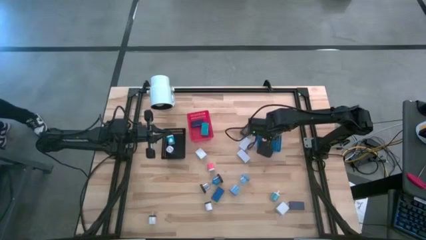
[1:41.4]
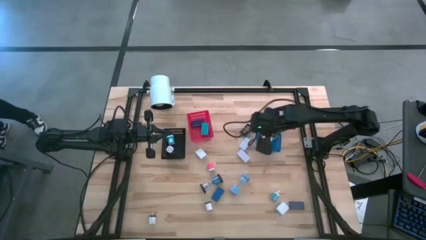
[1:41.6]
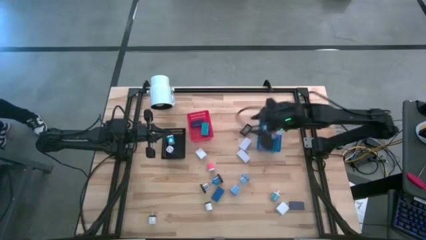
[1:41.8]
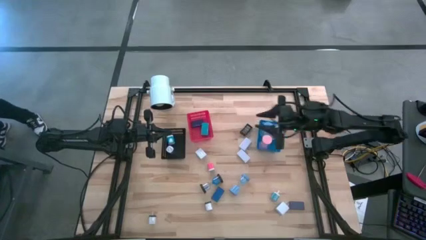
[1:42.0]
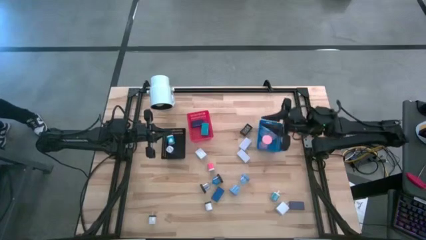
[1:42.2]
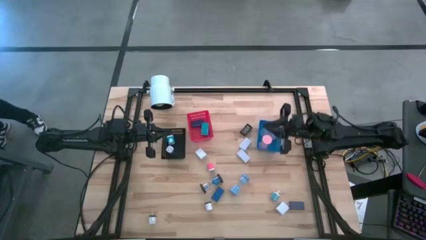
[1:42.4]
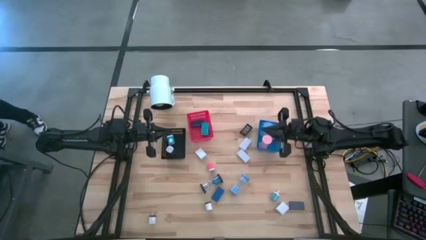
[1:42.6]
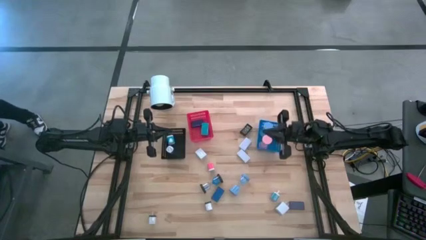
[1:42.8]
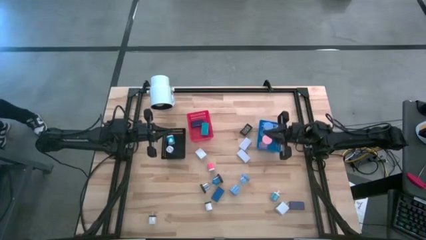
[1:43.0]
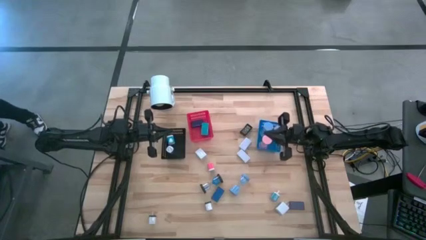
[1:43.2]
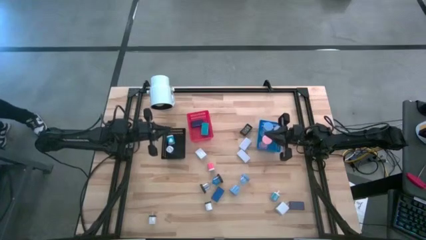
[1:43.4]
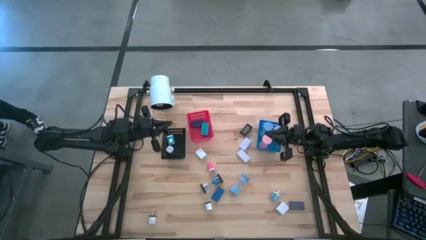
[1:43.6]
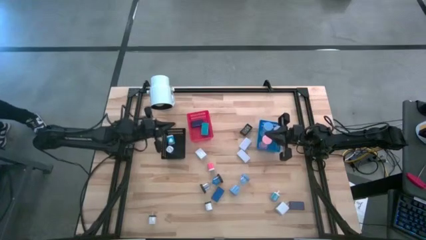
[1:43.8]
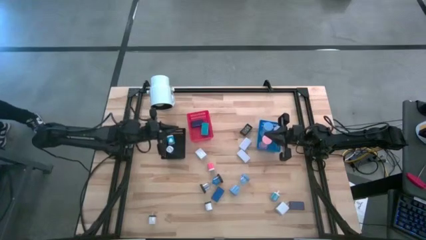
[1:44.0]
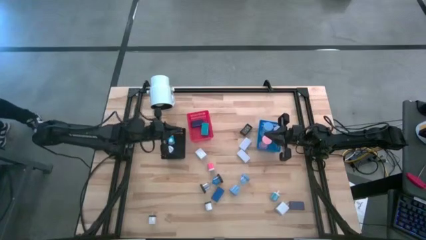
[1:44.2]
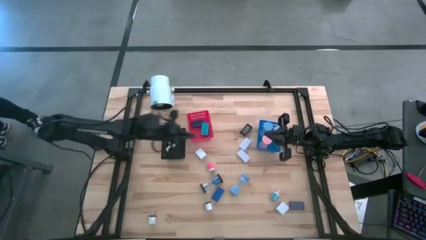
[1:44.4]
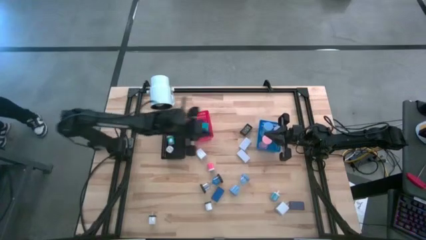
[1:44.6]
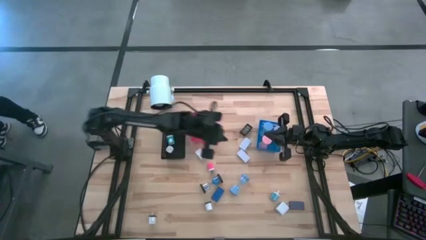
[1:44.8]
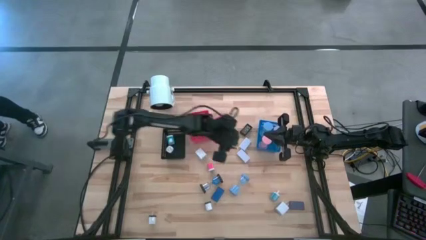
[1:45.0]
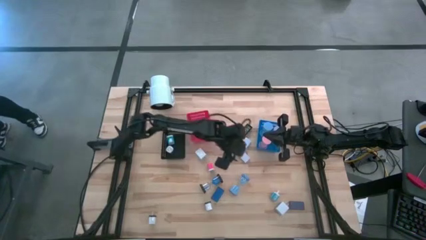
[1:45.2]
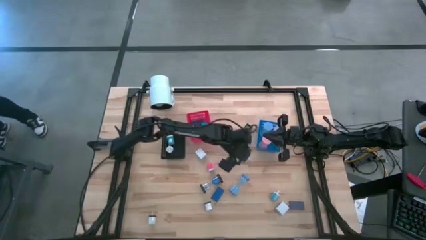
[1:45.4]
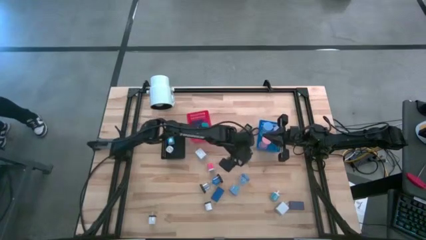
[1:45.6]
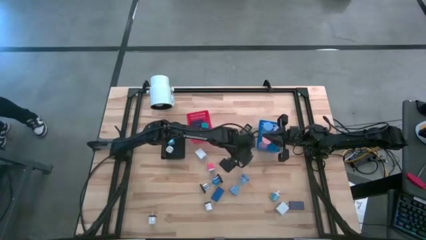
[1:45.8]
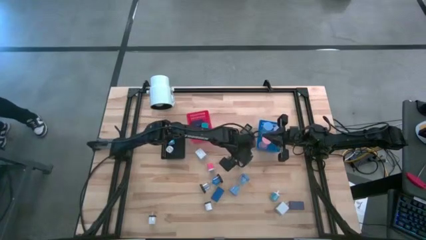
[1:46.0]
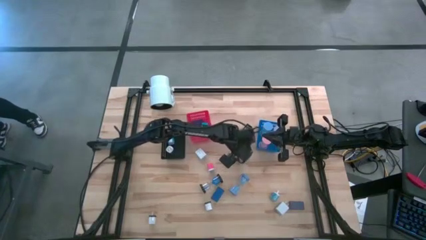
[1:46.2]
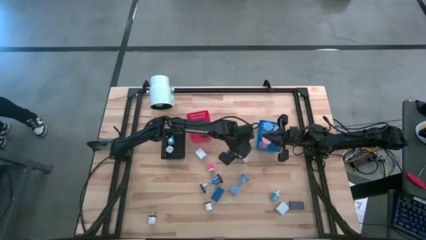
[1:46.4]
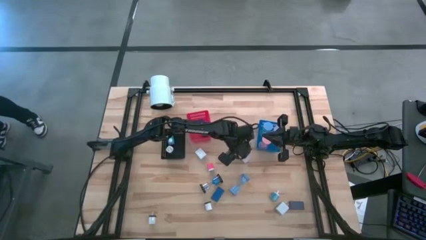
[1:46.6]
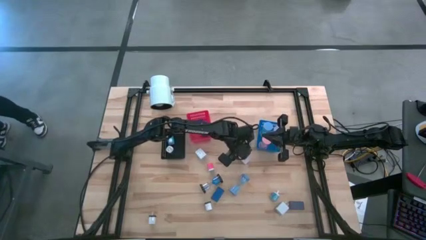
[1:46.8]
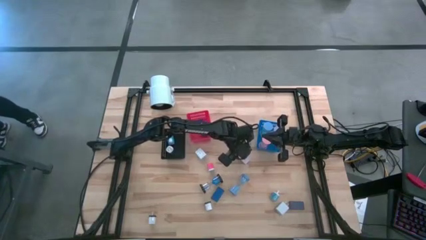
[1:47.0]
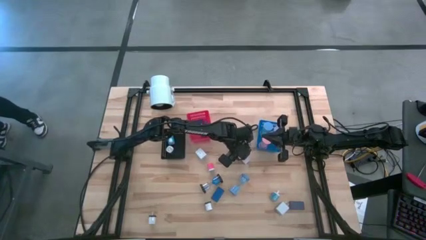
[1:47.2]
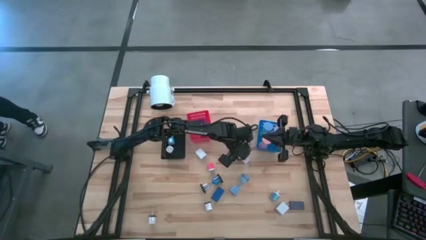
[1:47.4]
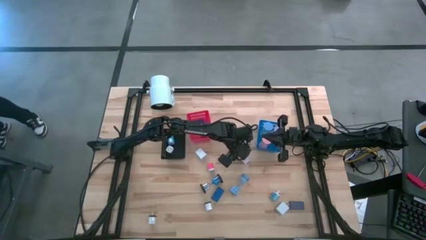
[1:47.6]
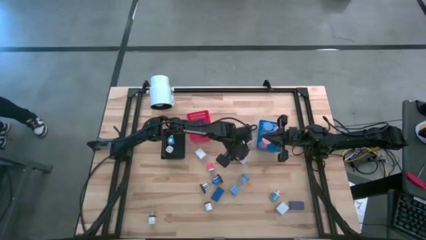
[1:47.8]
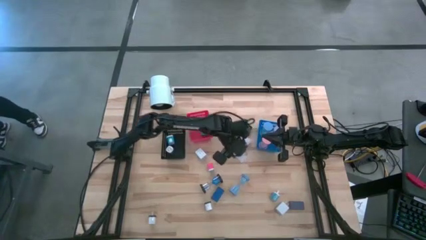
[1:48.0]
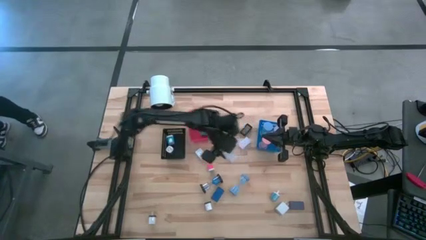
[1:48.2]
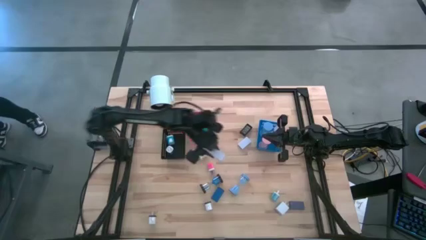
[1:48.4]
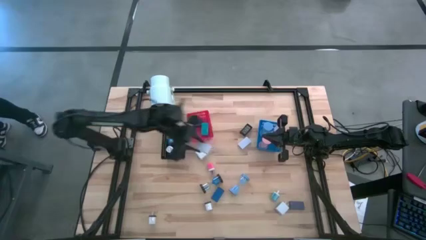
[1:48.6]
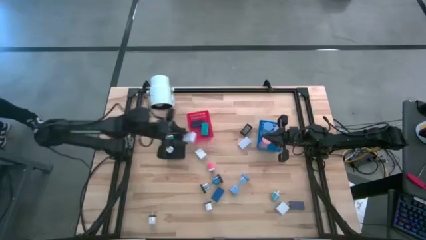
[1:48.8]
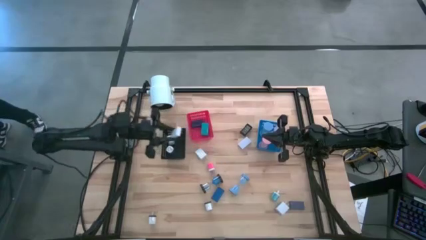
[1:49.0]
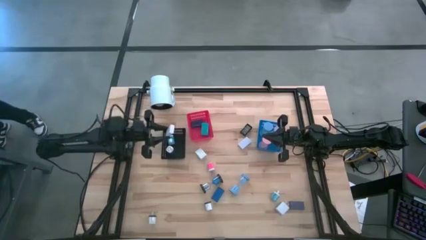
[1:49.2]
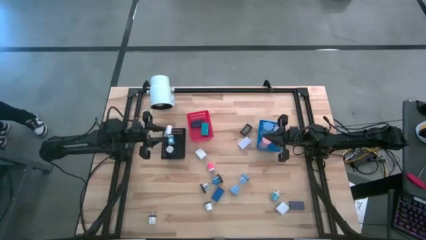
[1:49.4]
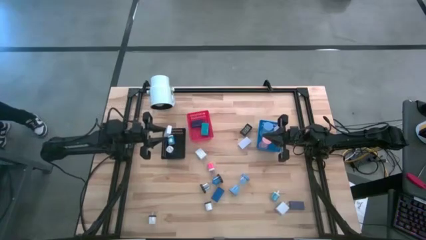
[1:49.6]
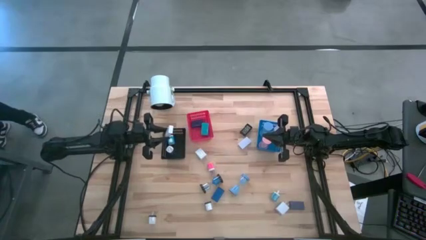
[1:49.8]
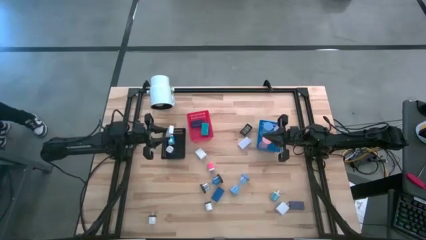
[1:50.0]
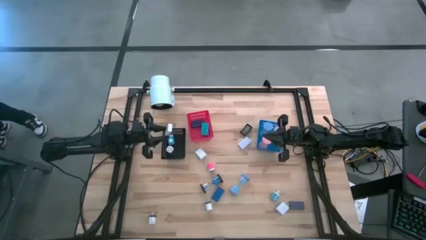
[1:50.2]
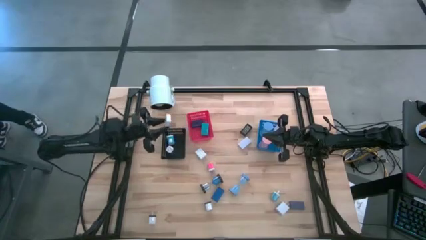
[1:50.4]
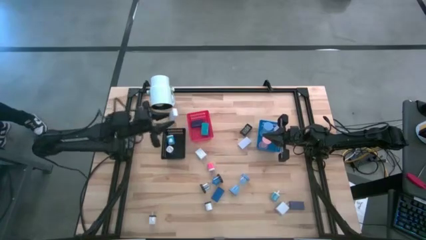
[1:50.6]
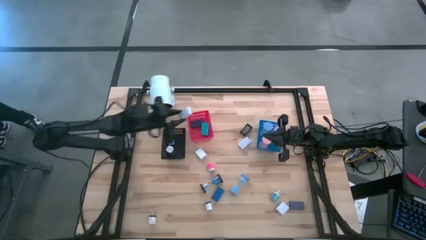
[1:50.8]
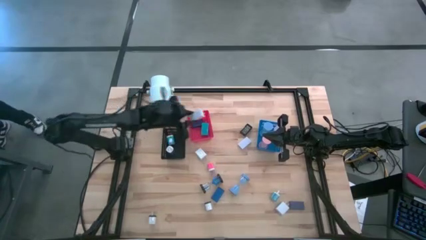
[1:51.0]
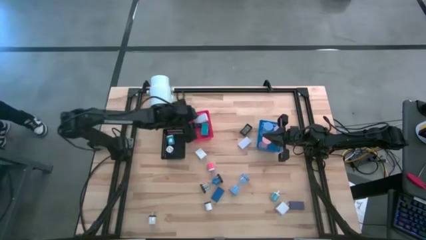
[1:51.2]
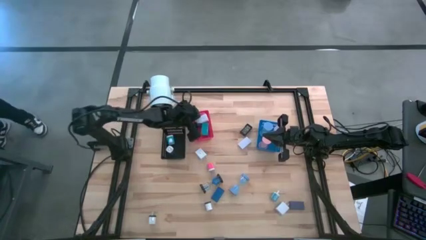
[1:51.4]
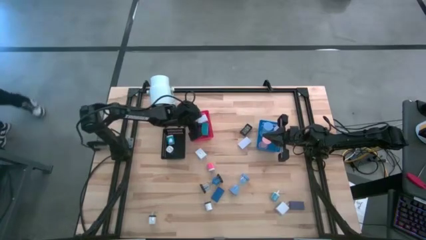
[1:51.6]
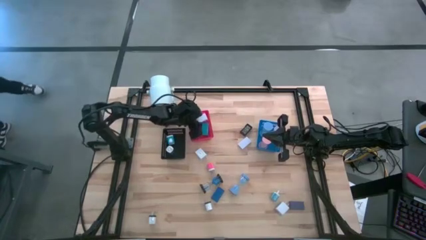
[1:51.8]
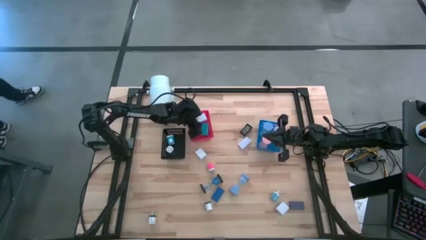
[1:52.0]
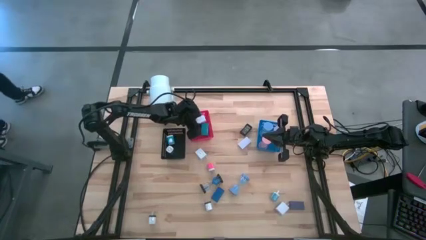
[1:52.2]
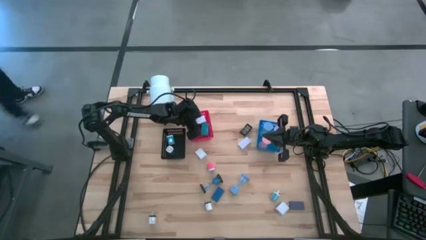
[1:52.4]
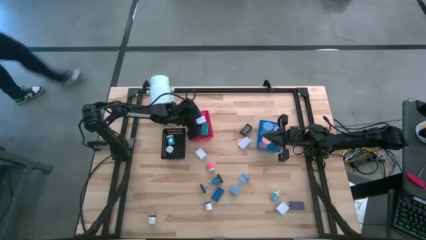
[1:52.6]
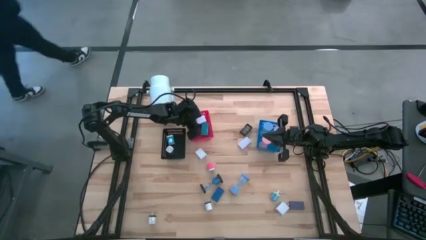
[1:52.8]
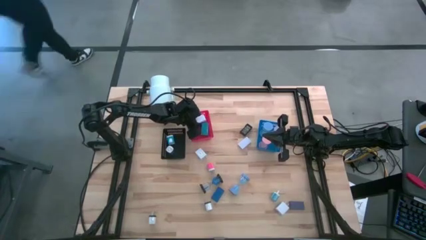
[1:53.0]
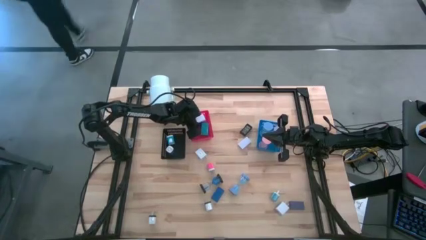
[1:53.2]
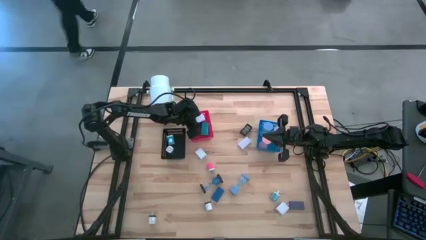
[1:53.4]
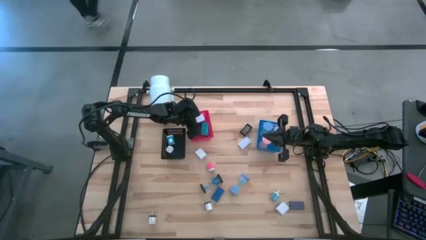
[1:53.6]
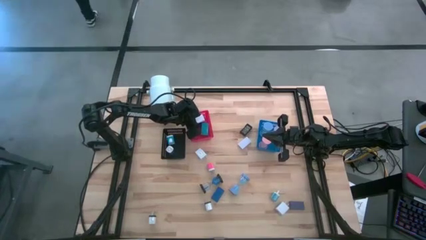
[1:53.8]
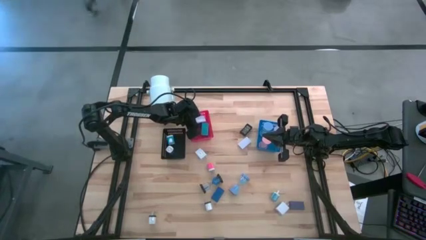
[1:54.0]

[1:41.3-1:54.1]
Task: Pick & Place Office items
Put the bottom right white digital clock into the red bin

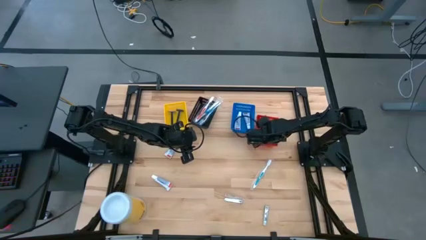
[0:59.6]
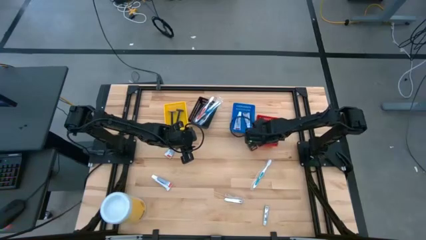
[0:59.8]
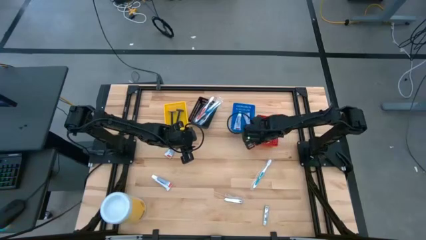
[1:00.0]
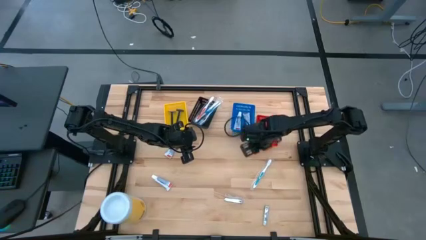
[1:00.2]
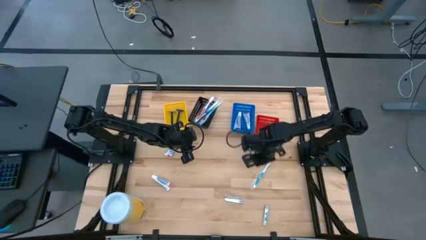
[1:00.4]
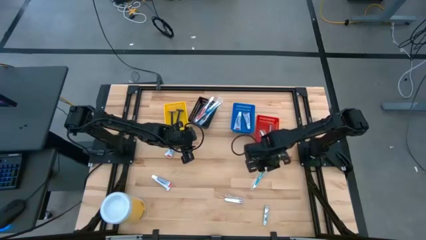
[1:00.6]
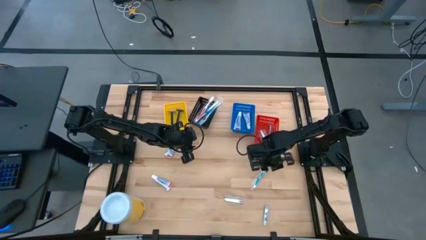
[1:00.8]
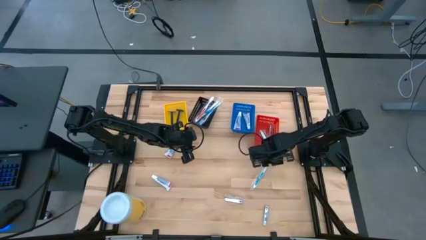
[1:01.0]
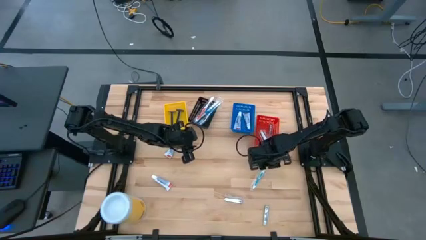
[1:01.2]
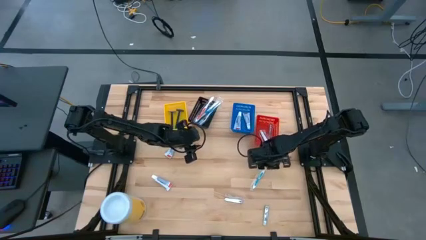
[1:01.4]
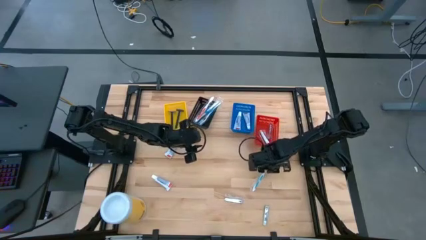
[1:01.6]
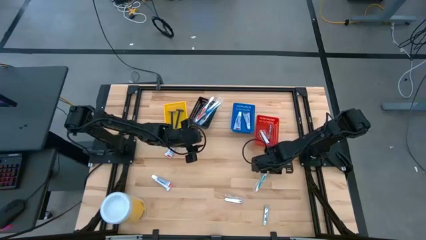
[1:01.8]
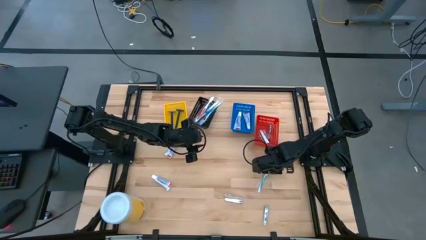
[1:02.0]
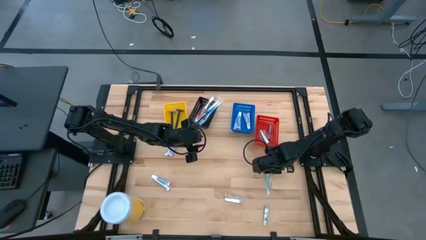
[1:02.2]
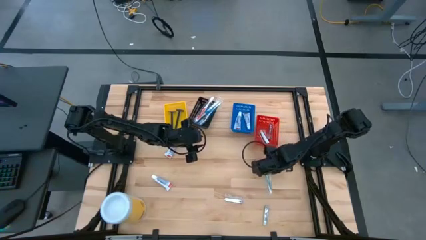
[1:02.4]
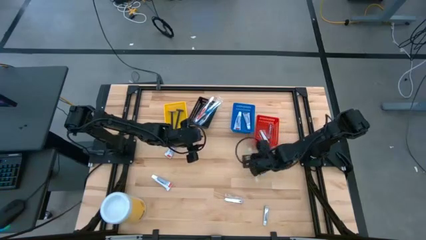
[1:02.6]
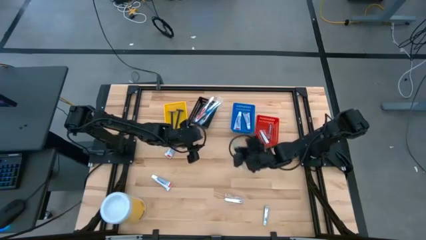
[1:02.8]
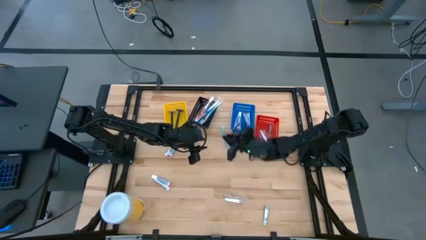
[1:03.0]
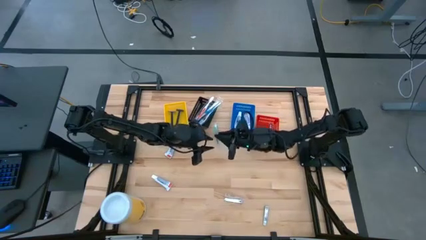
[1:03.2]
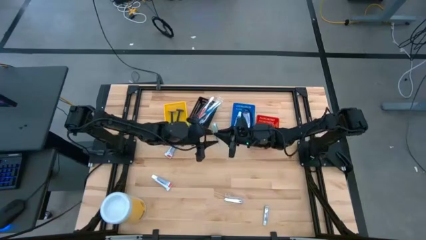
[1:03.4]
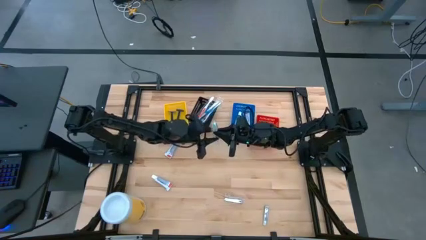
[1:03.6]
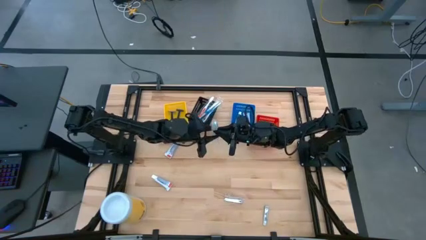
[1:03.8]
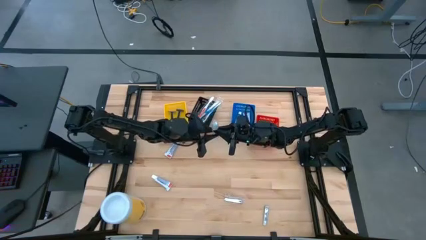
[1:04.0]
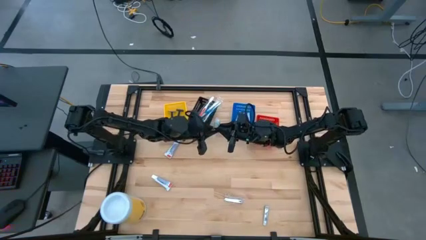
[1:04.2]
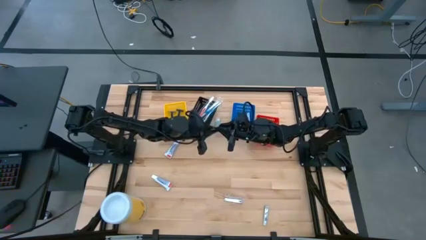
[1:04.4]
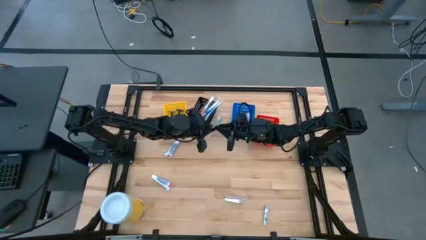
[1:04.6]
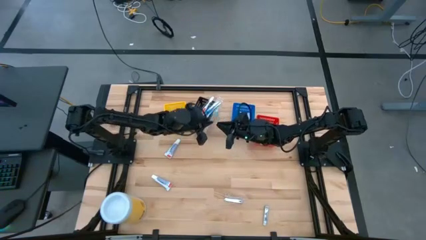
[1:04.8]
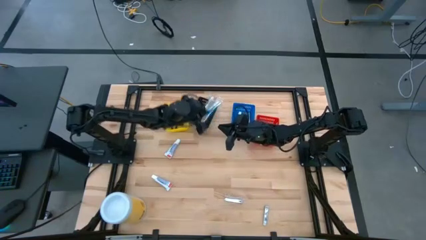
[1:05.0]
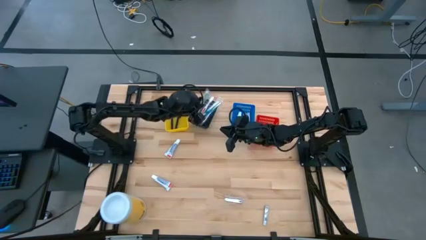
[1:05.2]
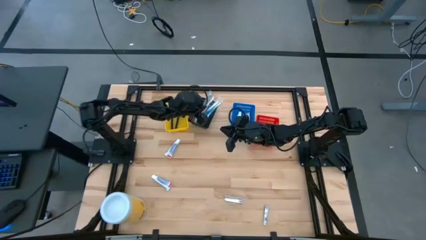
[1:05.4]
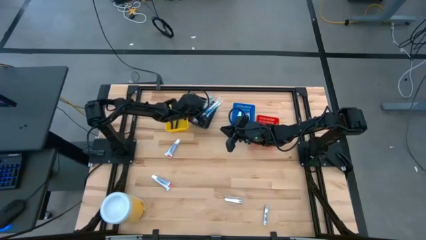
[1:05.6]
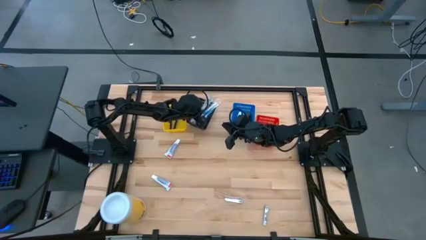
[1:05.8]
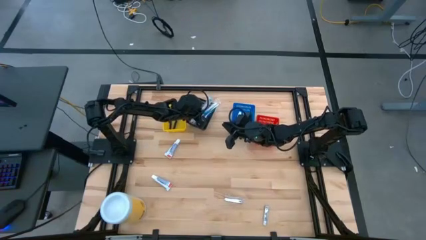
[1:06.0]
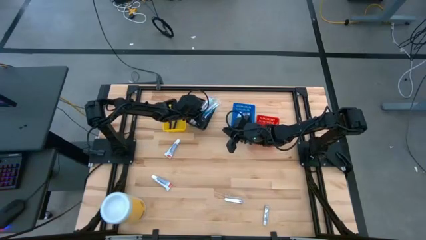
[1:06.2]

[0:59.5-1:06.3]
Task: Pick & Place Travel size toiletries
Put the green toothbrush into the black bin
